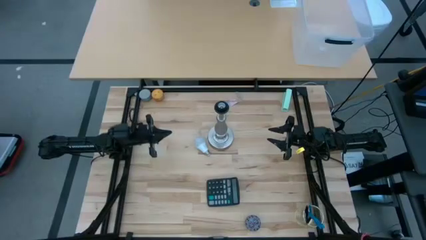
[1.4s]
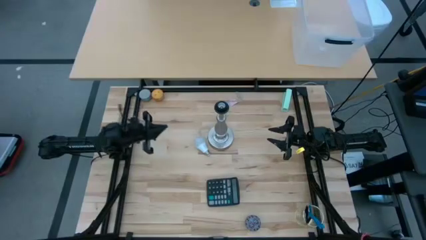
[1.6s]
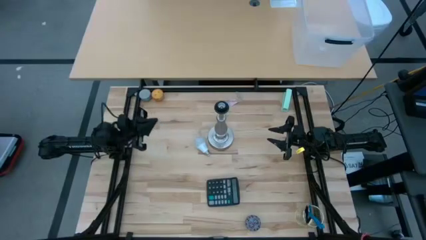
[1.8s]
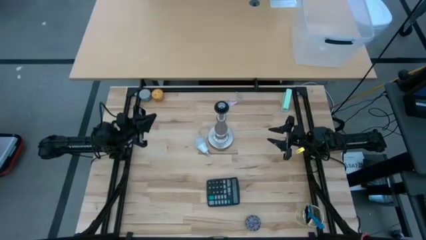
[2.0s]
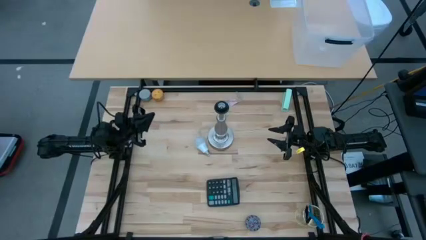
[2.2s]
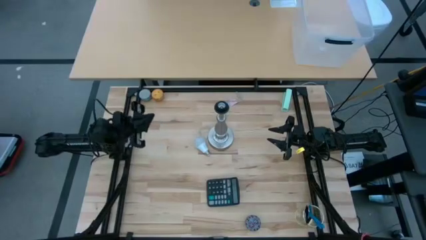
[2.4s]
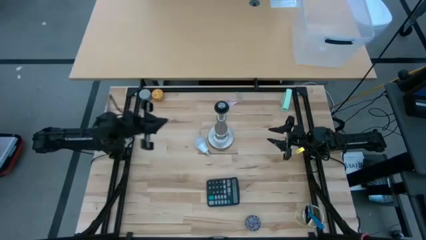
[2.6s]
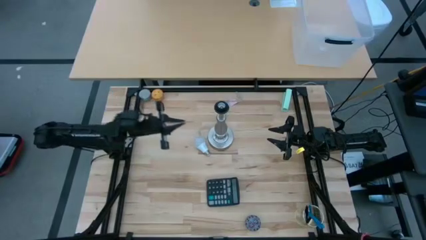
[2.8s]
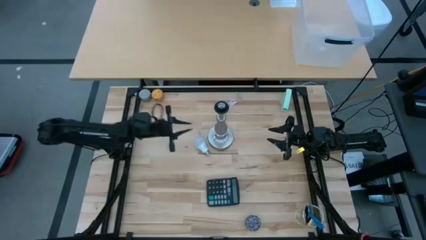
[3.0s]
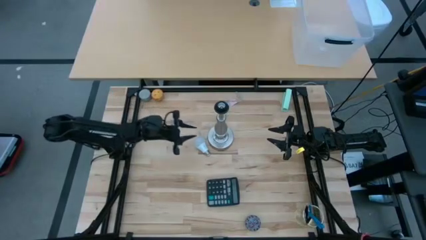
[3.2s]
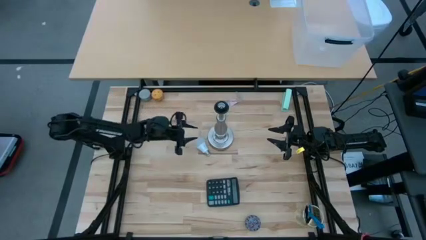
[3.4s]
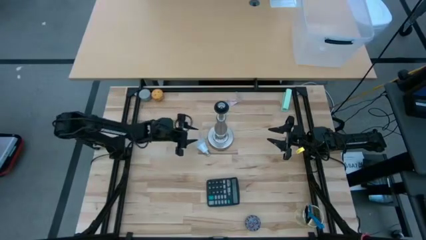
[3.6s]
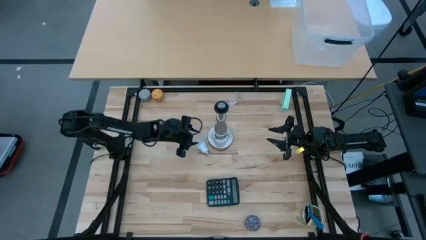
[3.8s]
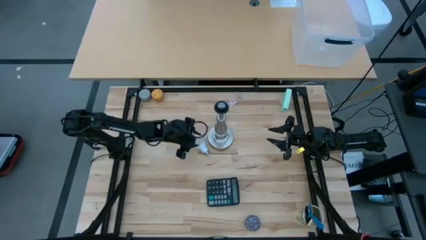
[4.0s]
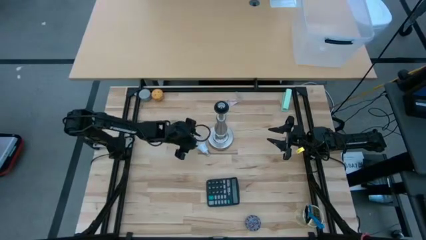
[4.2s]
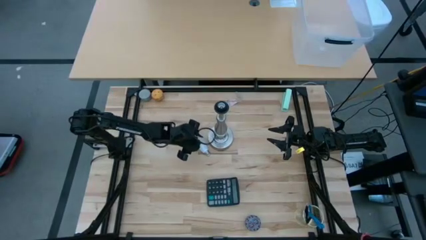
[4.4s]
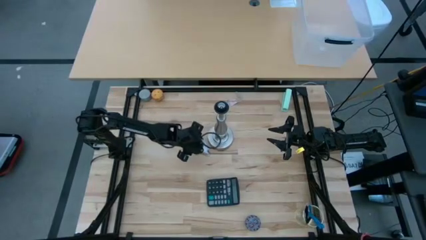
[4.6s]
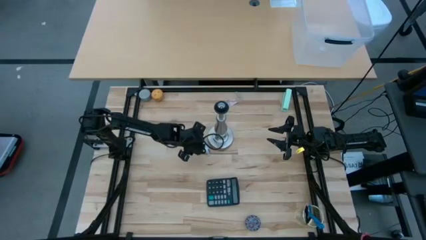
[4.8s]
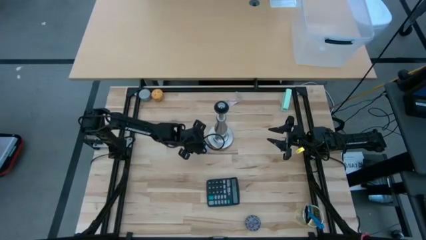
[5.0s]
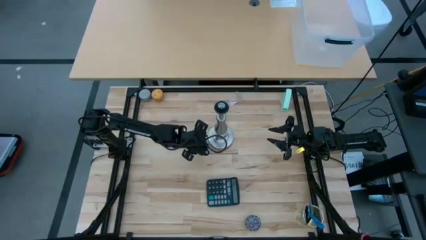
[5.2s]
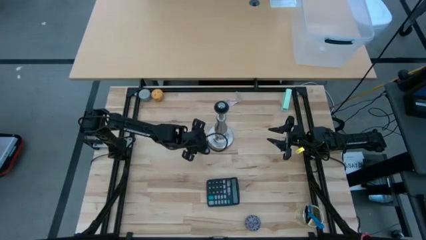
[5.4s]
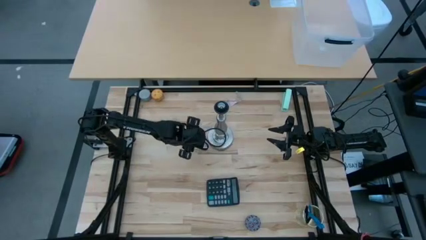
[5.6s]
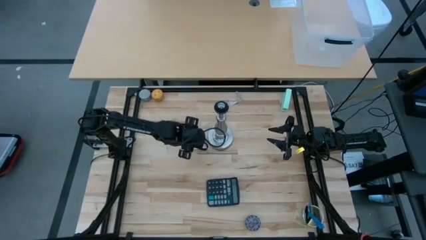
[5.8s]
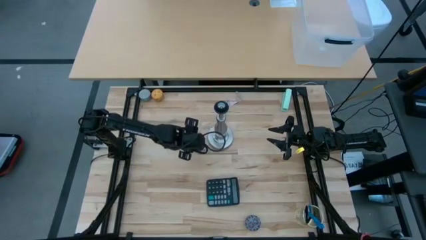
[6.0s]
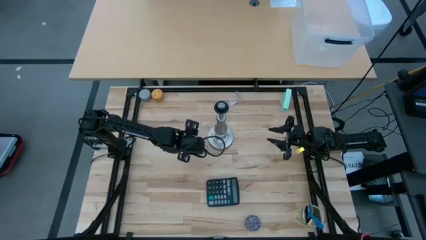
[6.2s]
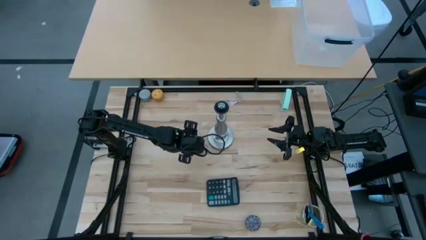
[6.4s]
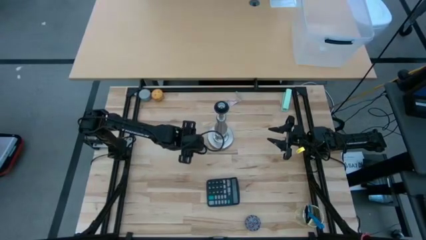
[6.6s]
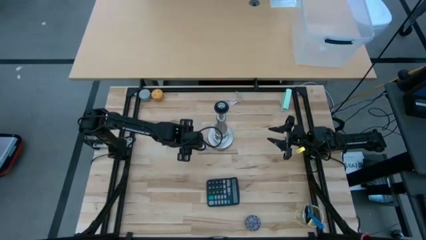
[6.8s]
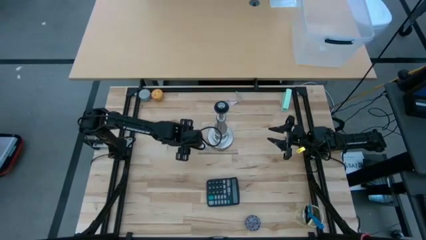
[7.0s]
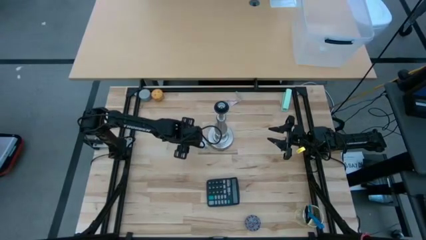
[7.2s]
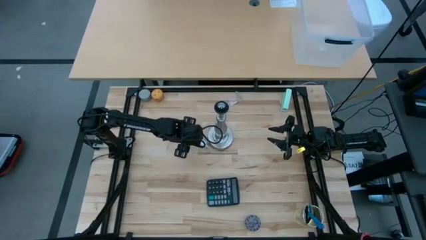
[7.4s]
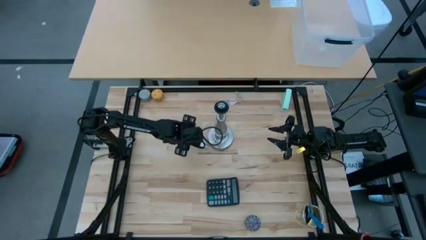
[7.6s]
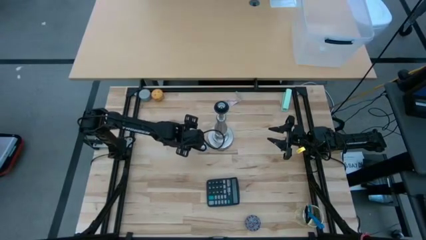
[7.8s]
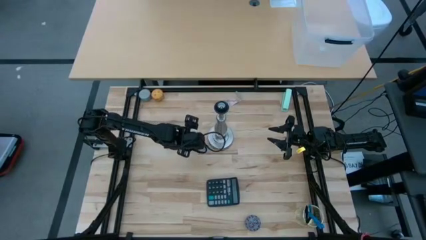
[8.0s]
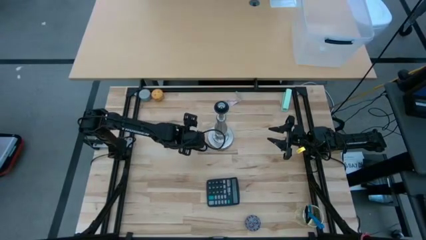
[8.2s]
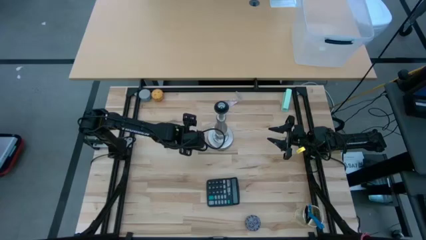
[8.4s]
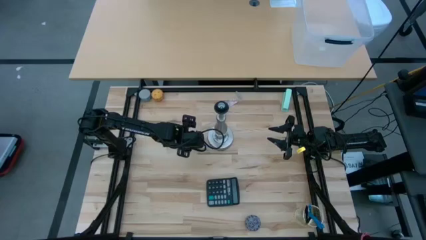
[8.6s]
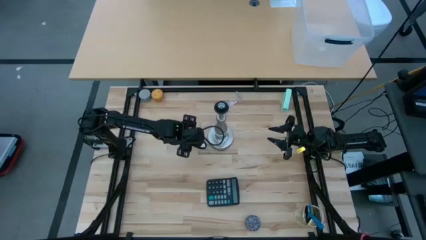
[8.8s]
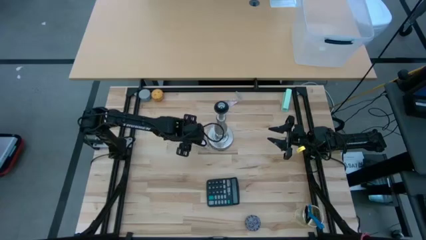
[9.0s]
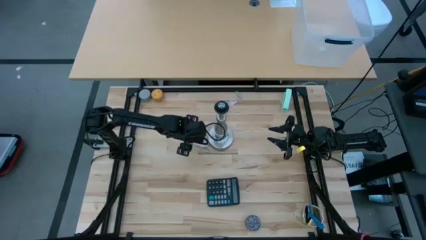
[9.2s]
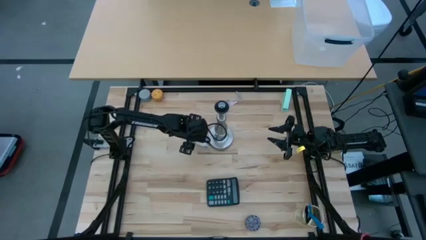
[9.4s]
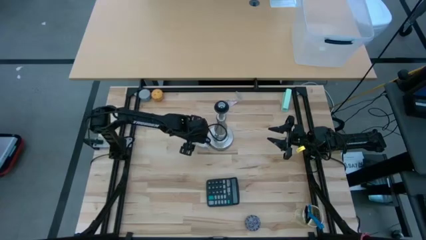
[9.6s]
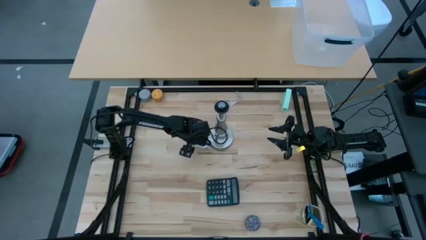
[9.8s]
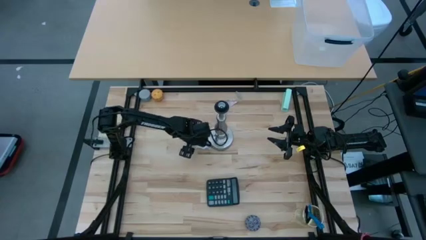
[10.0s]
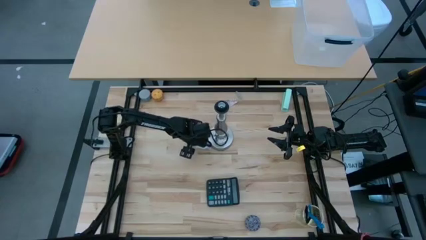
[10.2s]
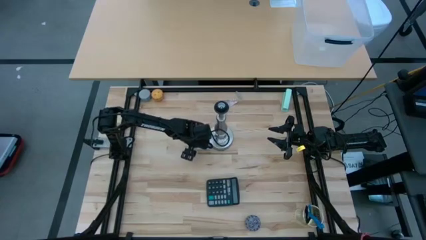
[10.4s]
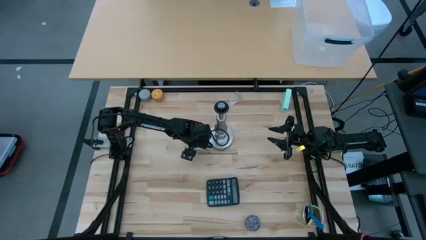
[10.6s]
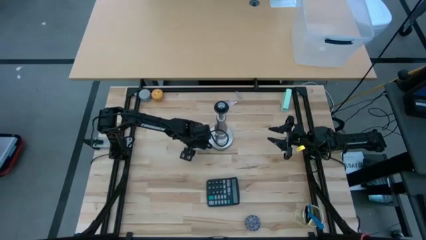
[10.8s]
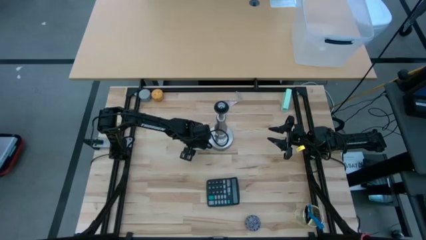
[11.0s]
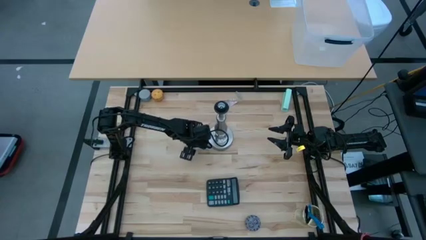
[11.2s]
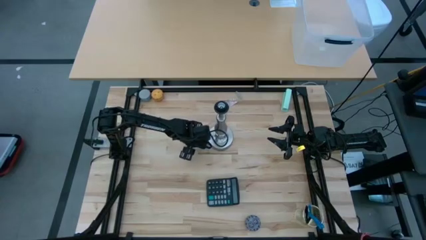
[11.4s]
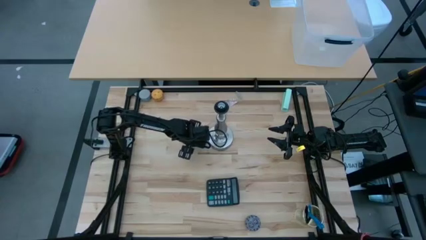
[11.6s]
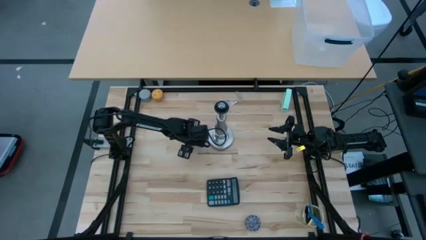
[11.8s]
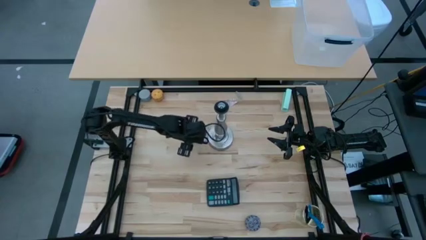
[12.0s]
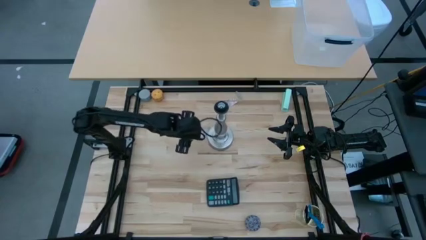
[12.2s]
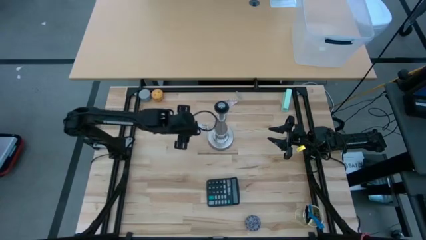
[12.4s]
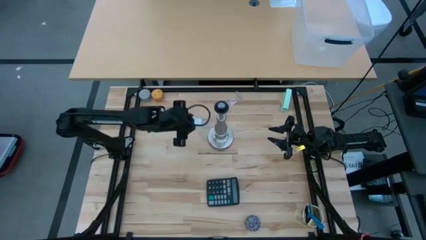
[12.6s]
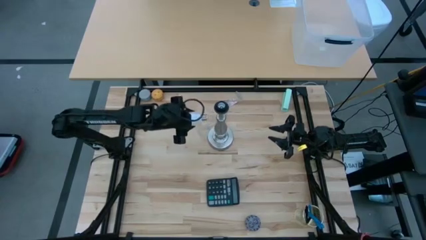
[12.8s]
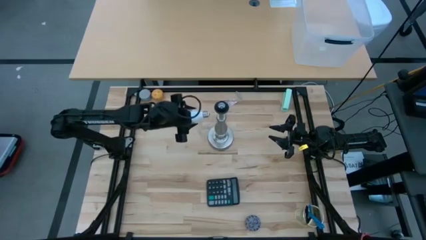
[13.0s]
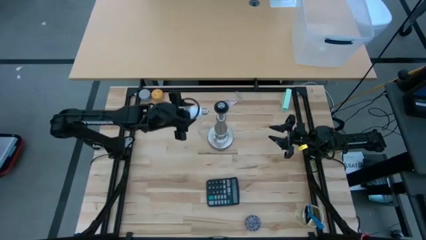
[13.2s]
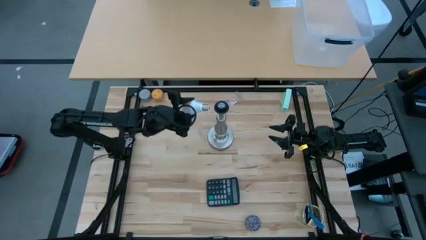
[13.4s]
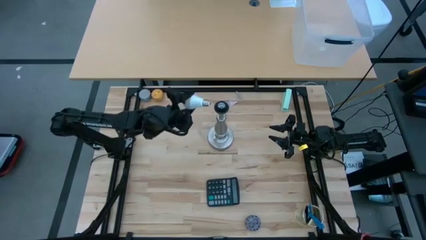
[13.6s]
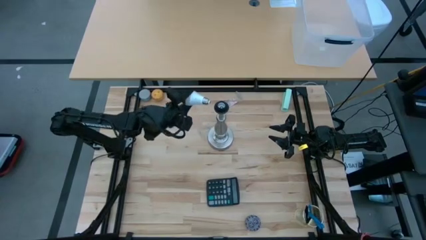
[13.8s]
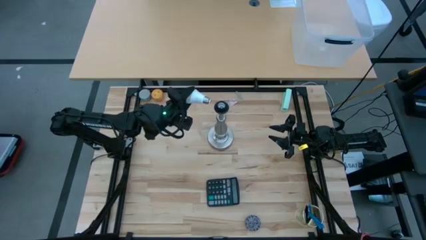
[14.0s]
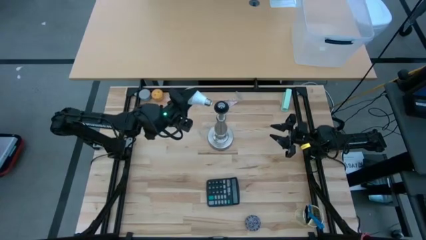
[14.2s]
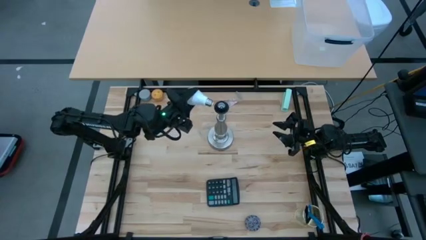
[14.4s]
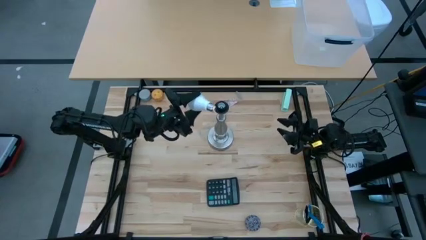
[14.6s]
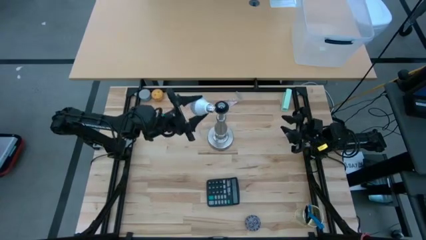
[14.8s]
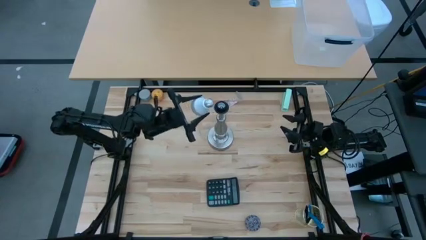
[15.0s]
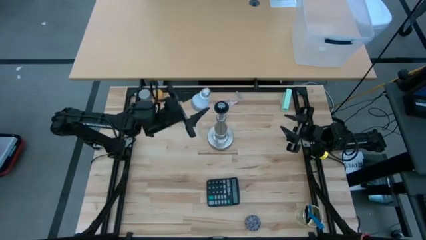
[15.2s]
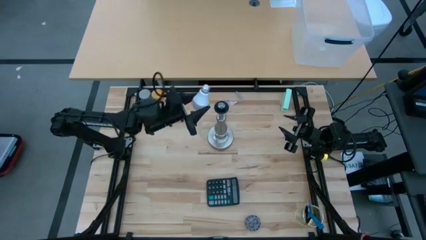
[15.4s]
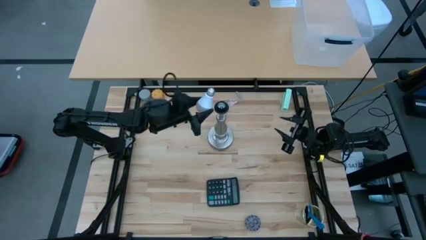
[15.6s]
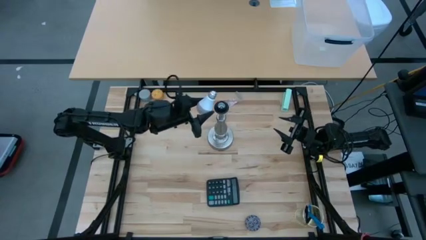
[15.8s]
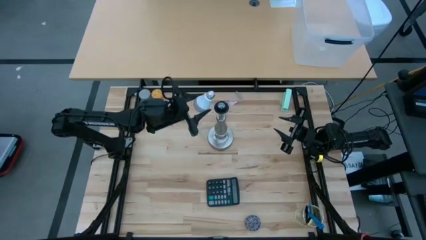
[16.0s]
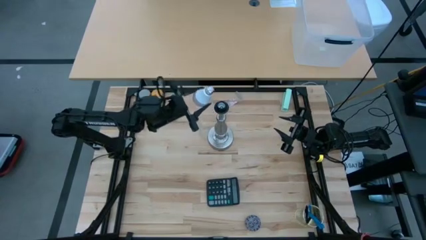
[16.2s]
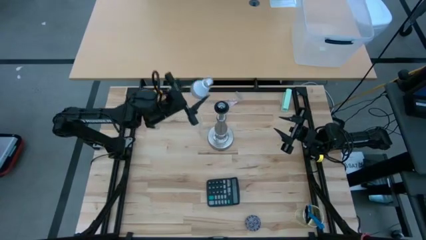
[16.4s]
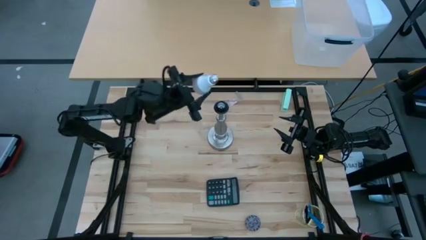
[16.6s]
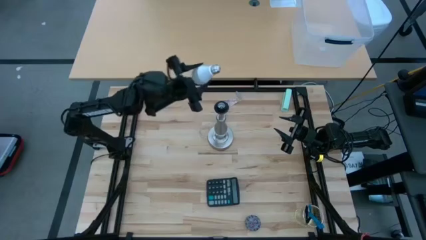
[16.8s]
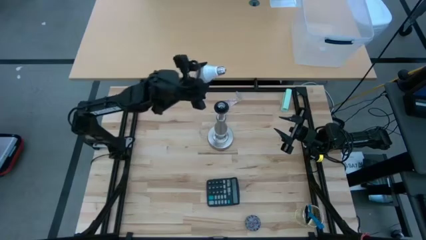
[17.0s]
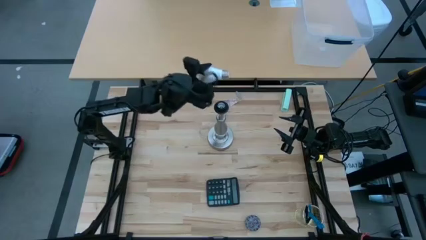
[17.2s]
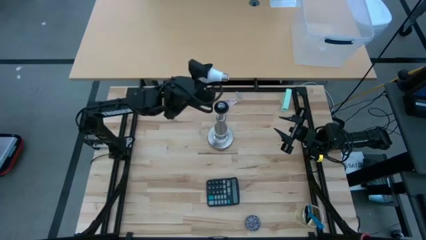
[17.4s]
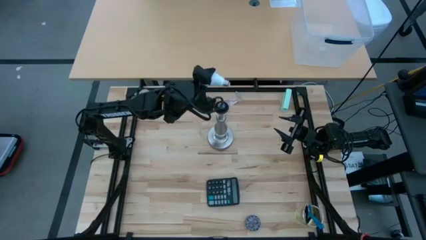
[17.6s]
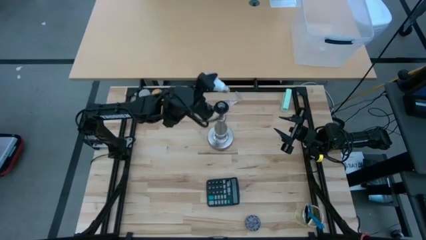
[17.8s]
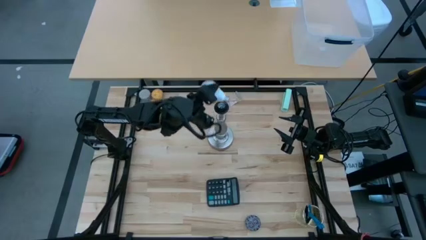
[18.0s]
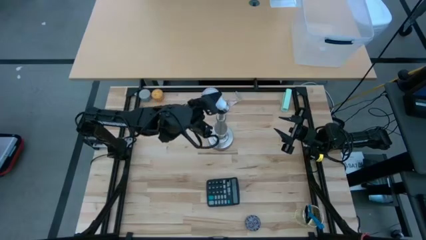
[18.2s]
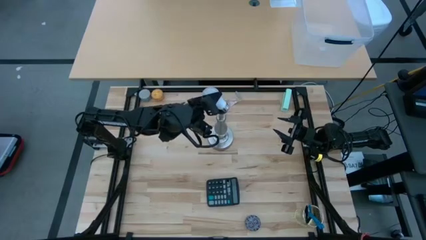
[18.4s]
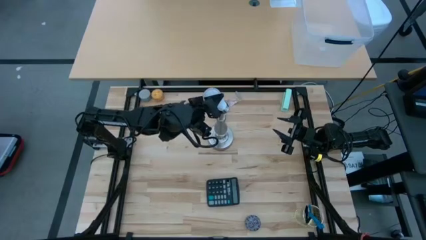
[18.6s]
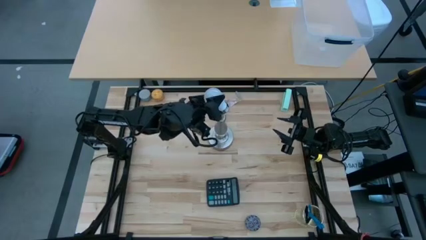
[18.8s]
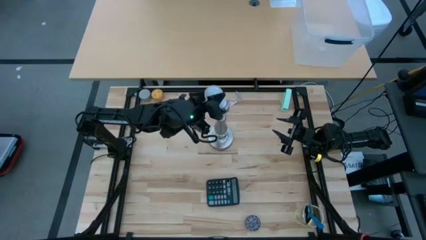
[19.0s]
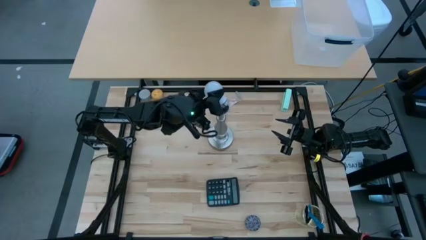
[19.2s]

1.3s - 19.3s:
Task: Screw lightbulb
Insert the light bulb into the lamp
